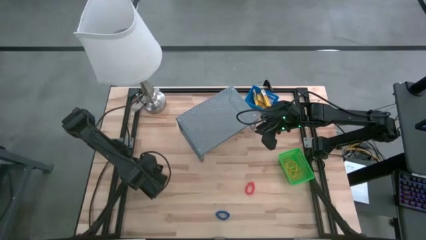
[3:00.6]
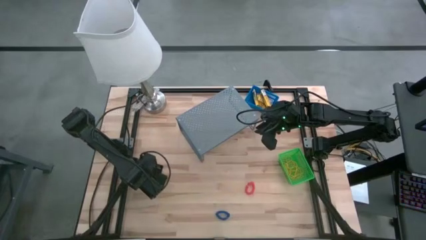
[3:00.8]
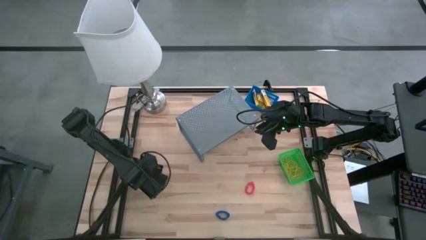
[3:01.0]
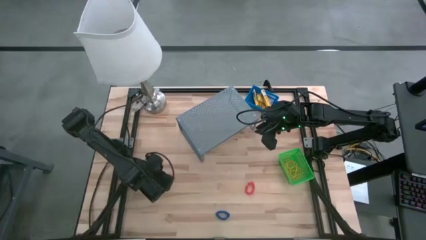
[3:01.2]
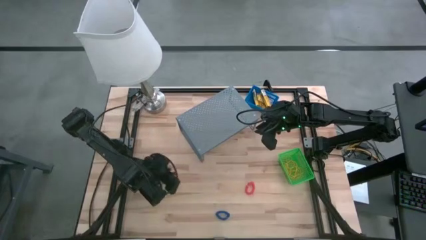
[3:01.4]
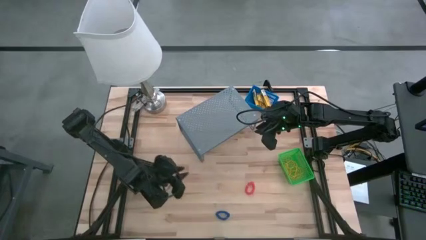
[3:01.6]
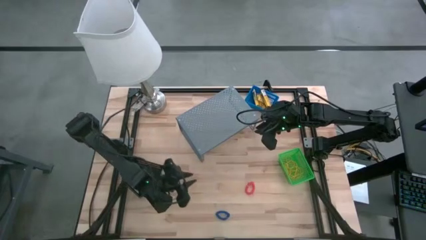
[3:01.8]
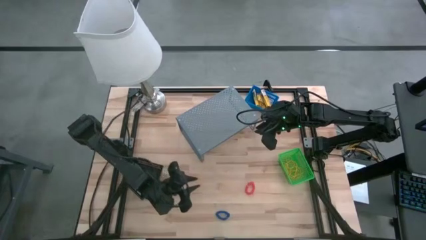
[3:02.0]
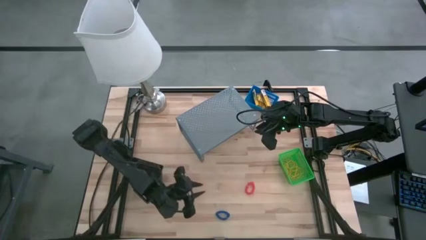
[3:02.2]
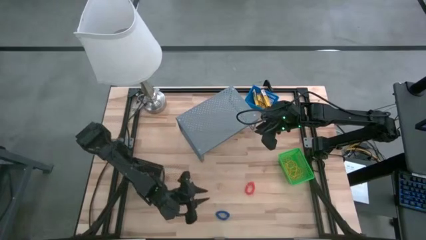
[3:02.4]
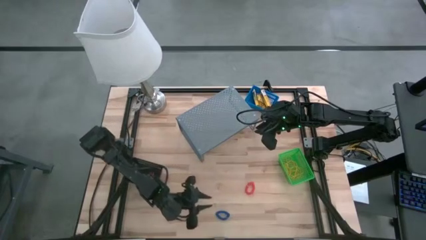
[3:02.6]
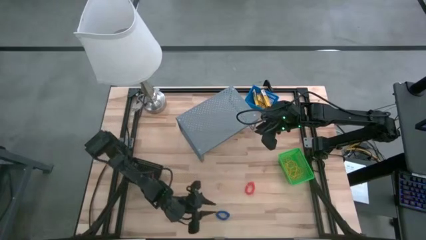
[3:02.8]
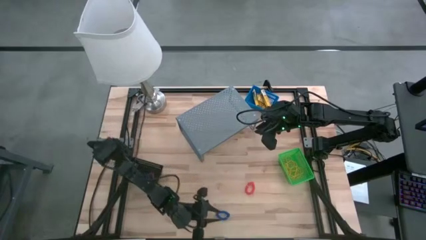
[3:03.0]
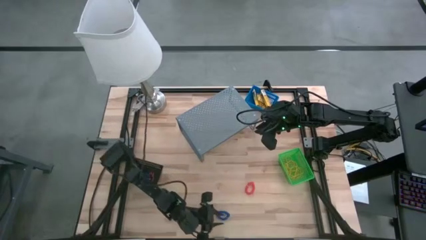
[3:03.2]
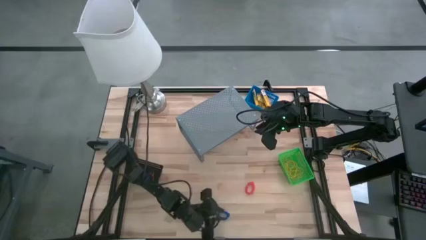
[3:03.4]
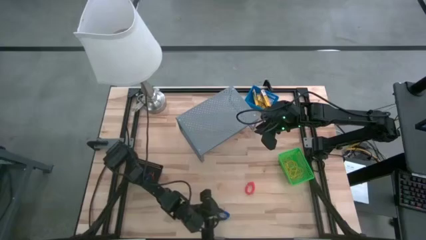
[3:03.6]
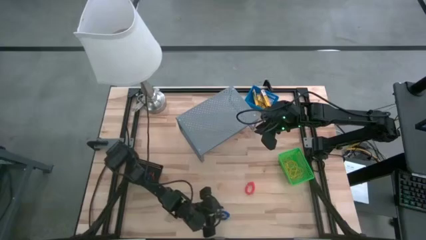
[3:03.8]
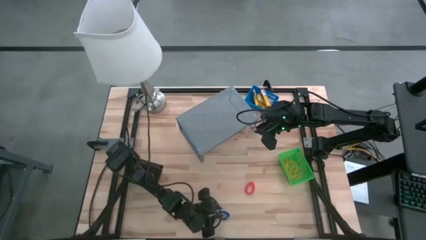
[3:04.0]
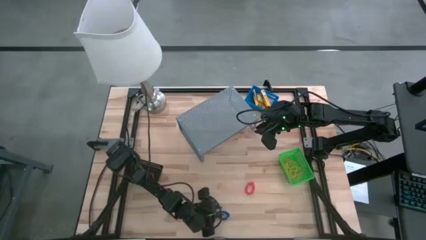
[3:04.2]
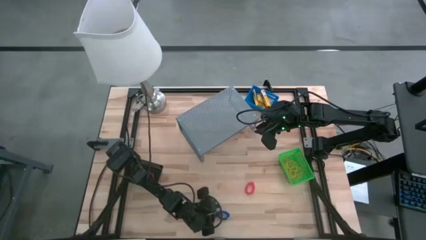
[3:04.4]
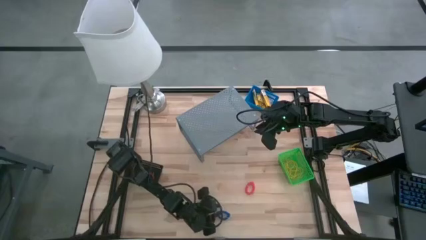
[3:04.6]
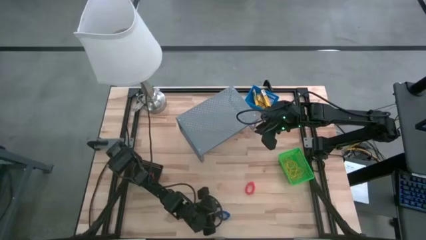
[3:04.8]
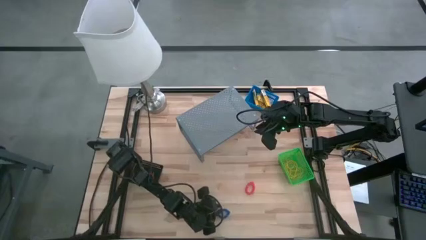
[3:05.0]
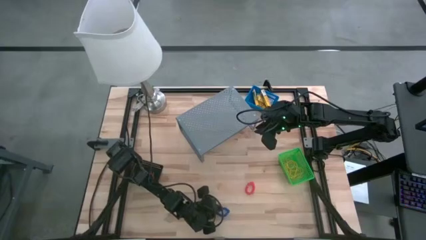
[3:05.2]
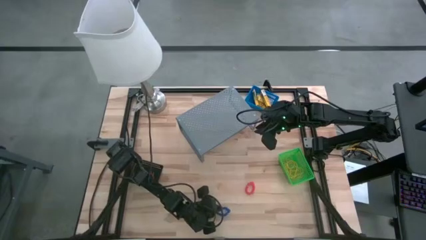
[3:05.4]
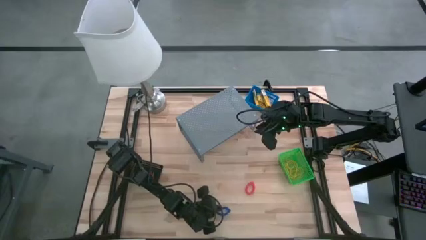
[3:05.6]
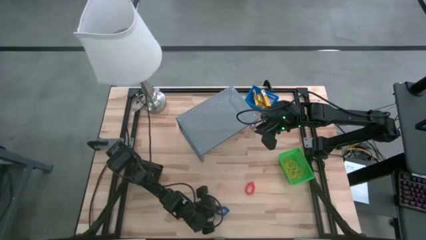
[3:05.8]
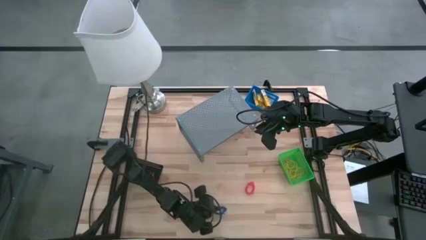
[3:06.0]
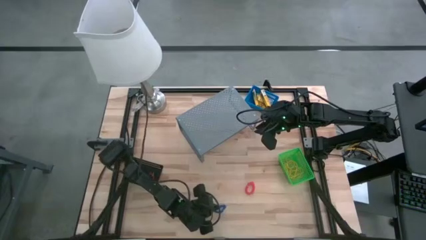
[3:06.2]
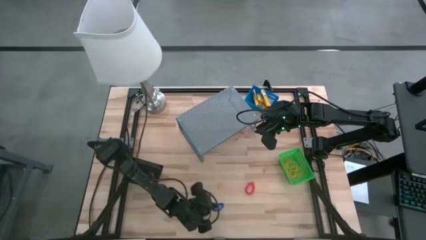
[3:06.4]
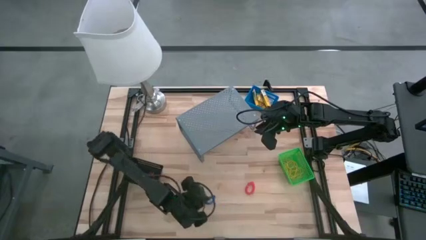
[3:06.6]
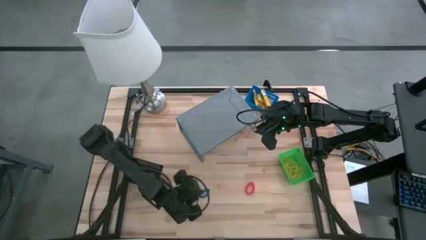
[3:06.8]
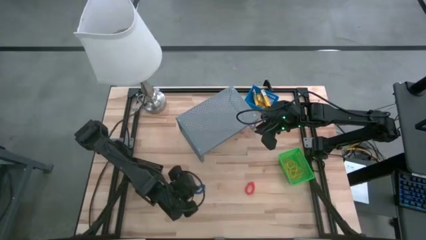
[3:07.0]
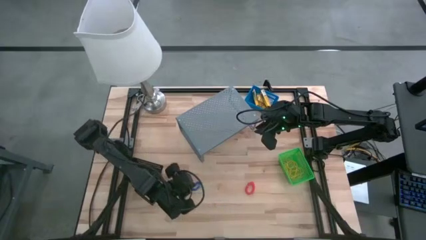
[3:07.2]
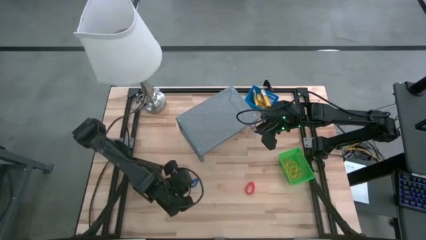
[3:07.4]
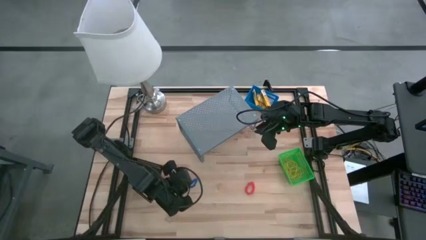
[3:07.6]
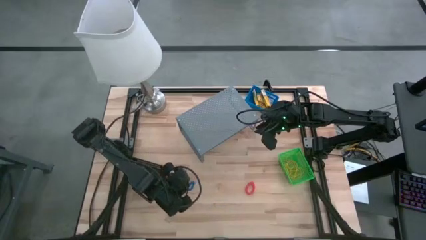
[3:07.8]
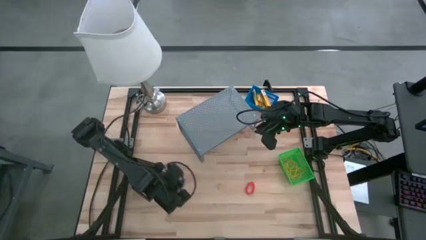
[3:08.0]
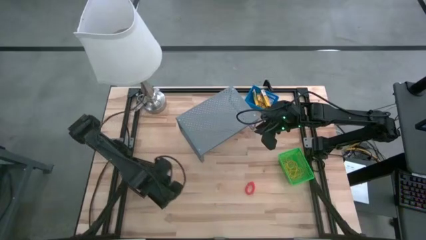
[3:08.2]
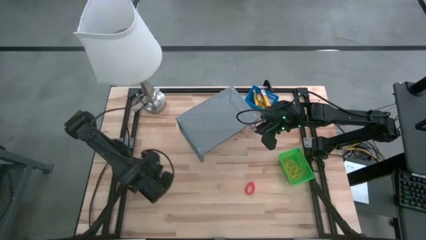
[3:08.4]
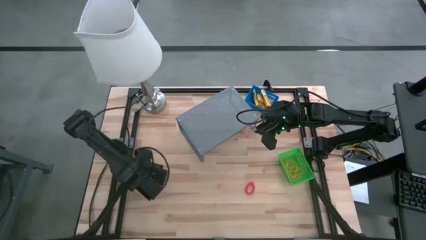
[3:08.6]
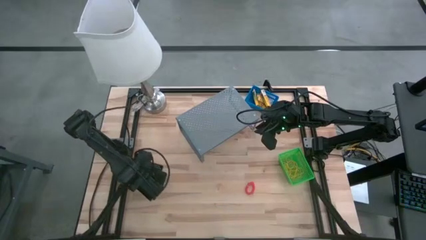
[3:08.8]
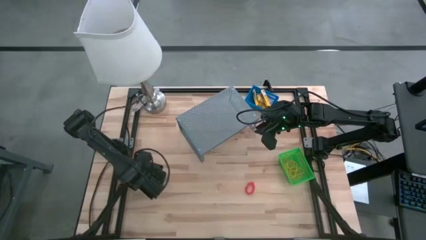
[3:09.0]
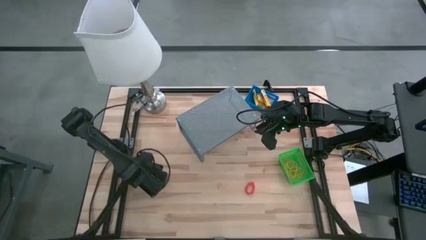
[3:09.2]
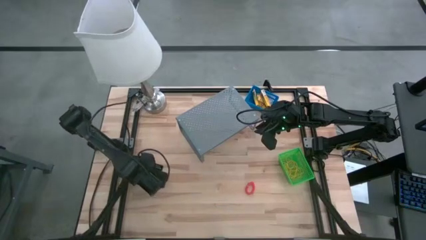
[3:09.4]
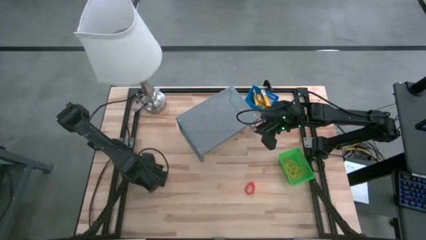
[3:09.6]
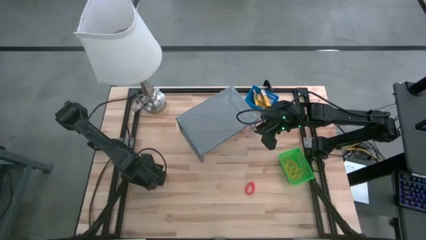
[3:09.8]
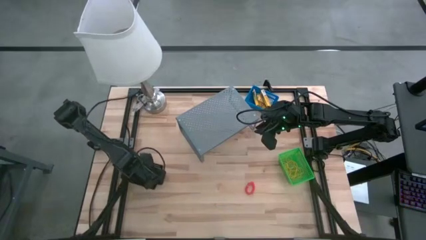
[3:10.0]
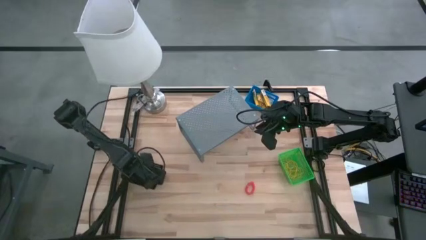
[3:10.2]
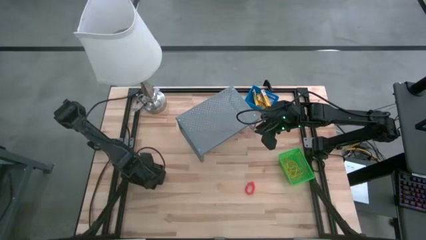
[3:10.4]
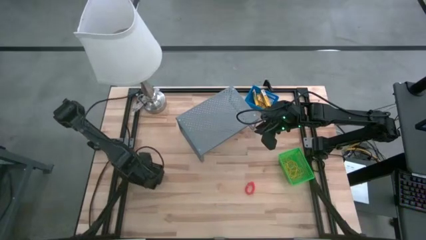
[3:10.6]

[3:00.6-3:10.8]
Task: Pick & Place Office Desk Supplies
Put the blue spring keychain into the black basket

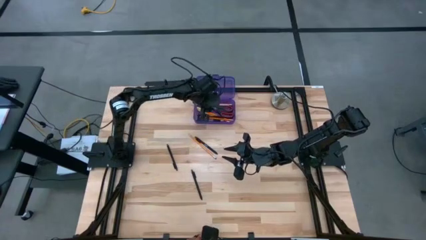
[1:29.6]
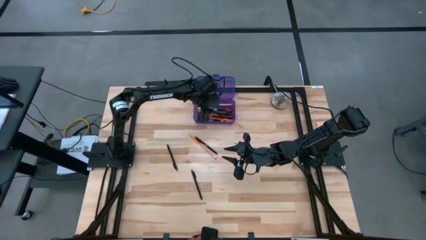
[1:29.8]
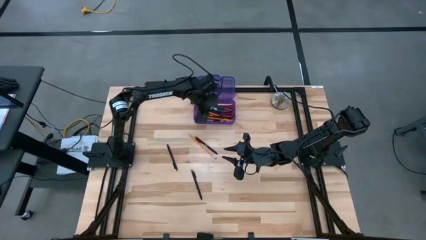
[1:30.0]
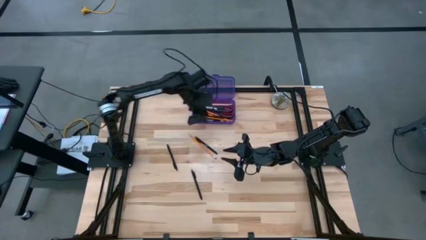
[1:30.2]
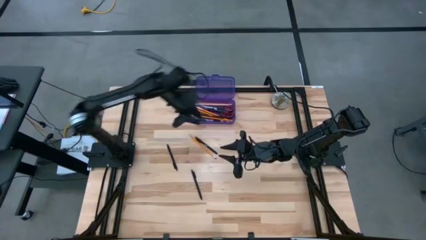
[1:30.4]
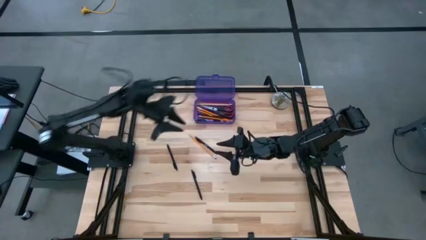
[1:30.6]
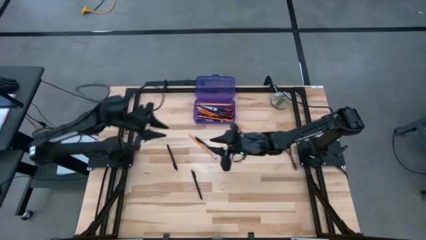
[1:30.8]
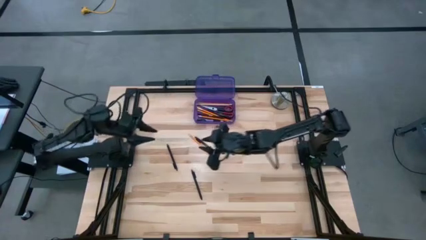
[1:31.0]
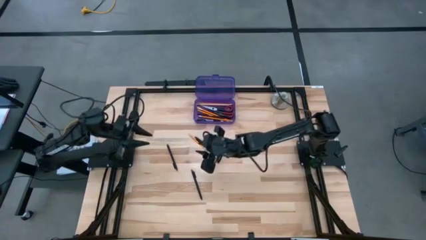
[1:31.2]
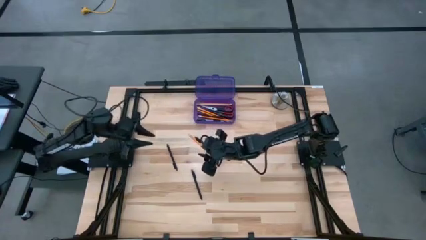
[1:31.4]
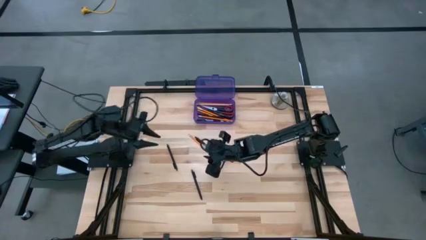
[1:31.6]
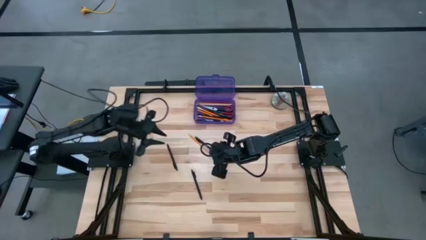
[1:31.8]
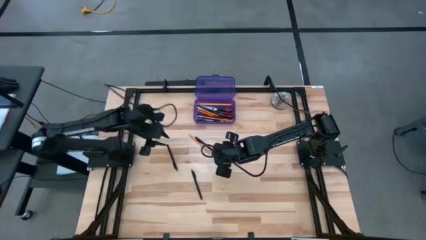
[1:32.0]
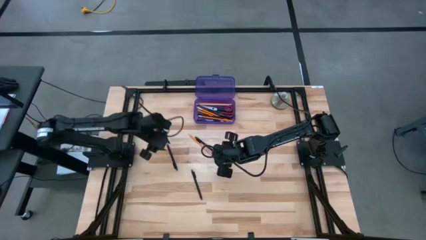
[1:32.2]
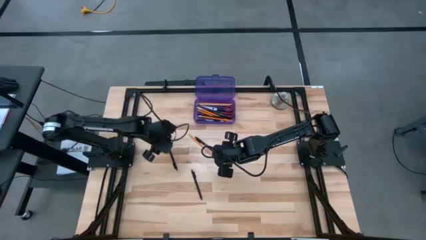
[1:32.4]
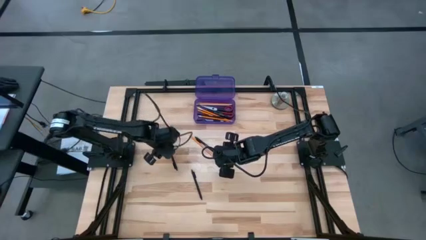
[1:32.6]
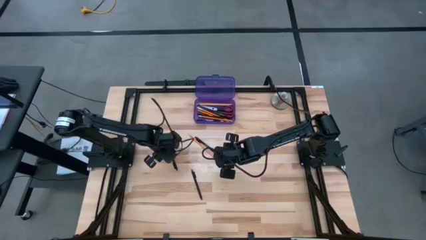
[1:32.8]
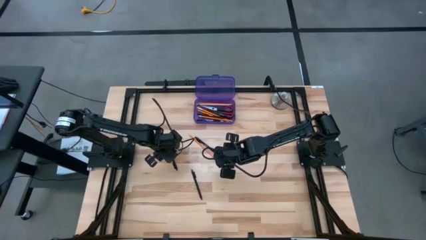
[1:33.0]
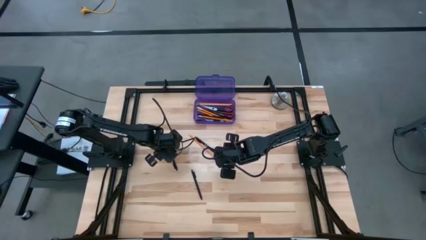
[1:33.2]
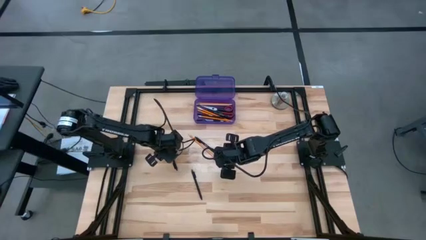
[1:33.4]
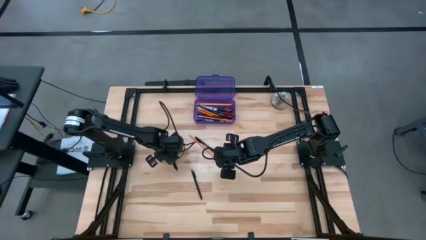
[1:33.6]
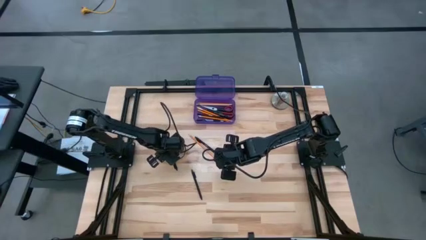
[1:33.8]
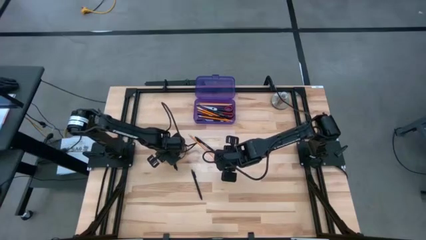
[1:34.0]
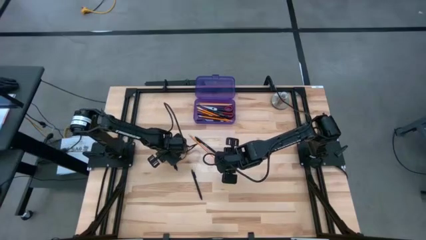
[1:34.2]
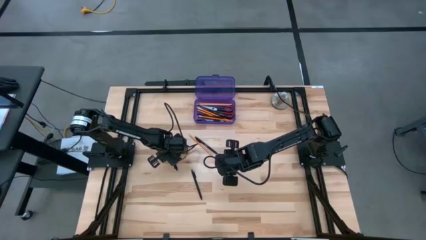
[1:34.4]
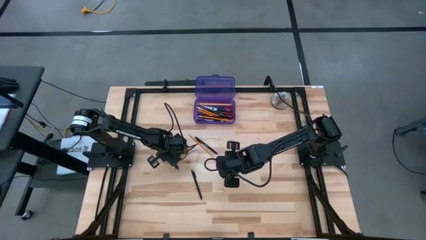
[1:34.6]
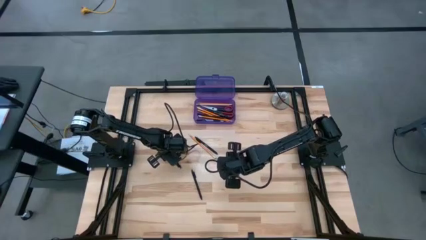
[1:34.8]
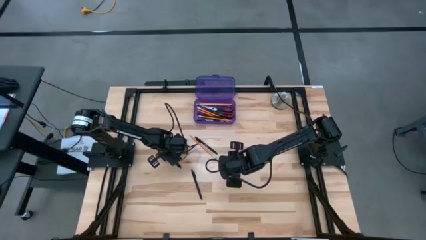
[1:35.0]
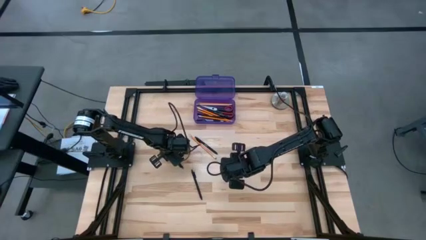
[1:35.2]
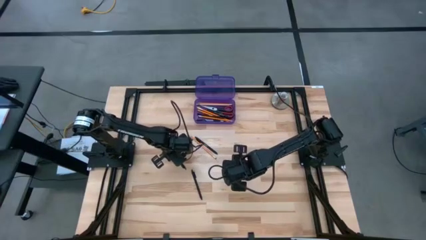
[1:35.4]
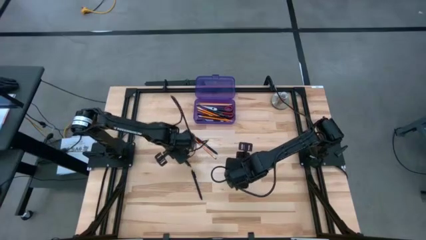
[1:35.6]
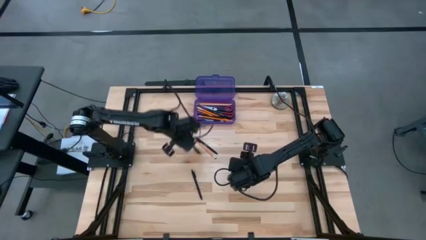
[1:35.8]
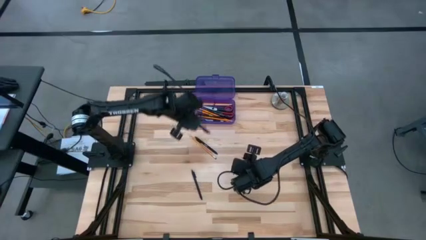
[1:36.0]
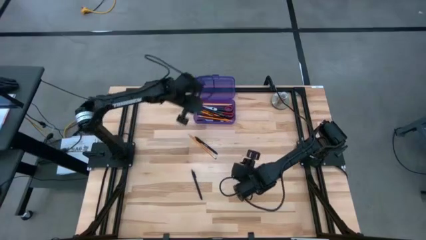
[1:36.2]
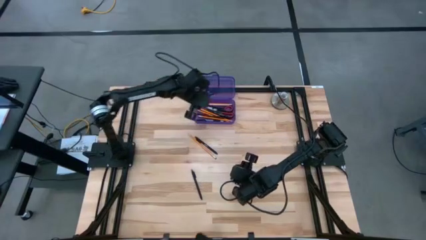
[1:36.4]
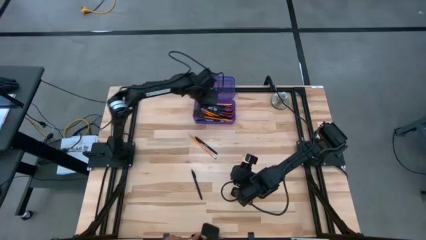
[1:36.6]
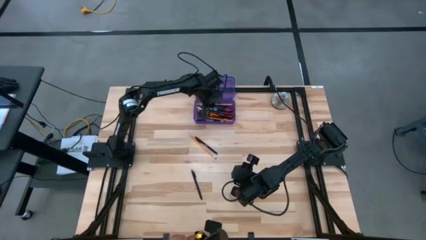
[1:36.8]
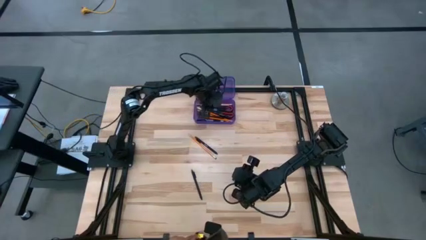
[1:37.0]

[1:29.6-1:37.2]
Task: Pick & place school supplies into a supply box
Put the black pen into the violet supply box
